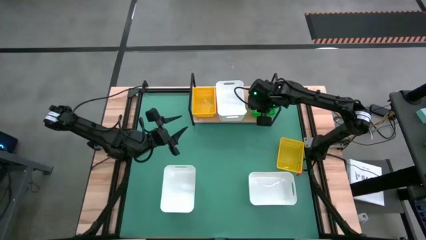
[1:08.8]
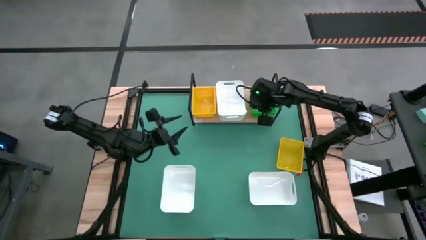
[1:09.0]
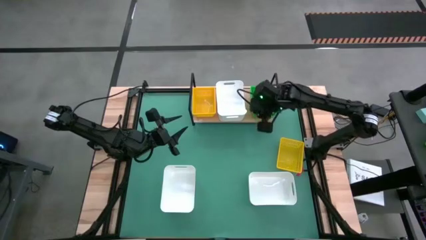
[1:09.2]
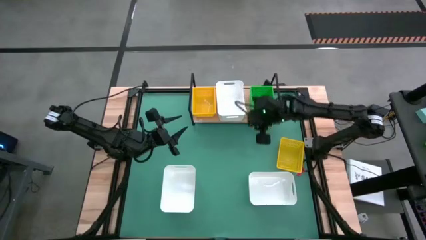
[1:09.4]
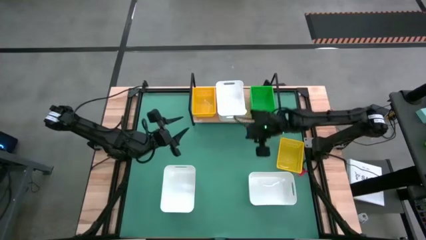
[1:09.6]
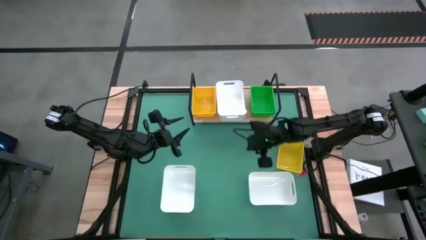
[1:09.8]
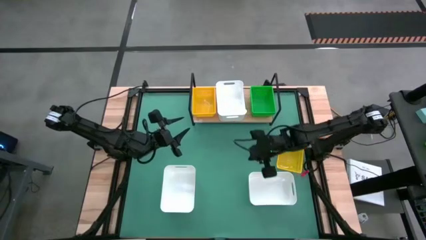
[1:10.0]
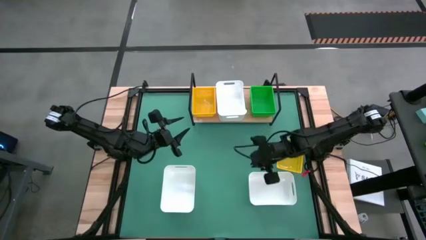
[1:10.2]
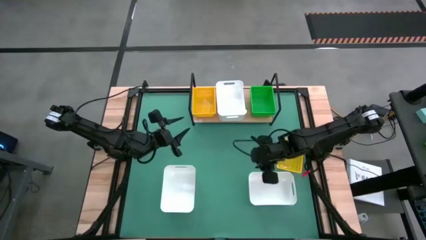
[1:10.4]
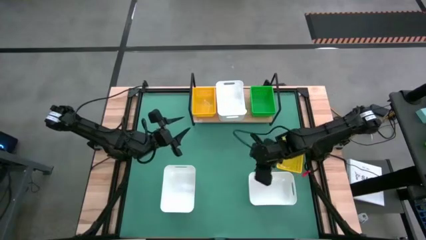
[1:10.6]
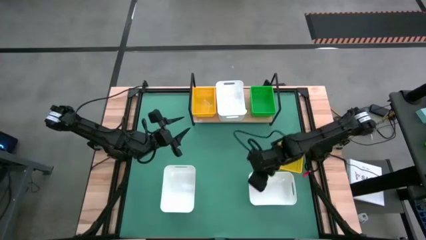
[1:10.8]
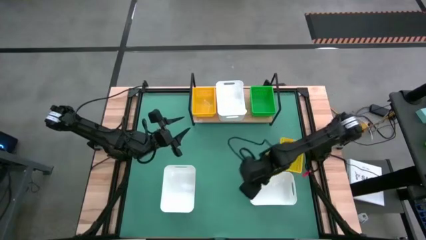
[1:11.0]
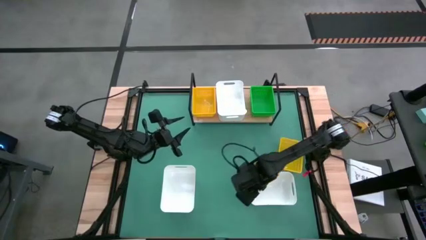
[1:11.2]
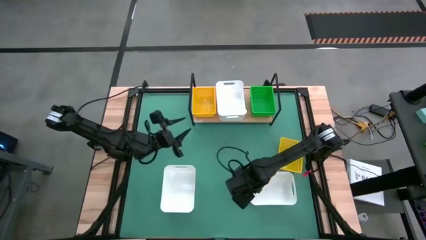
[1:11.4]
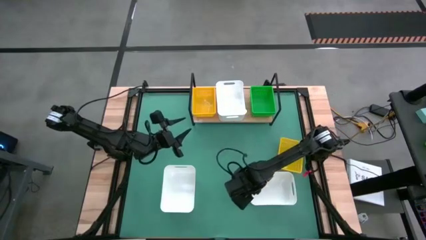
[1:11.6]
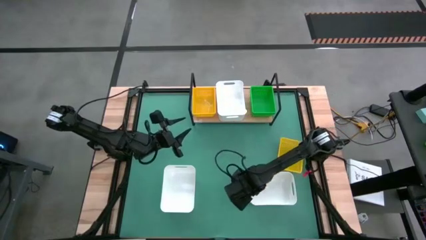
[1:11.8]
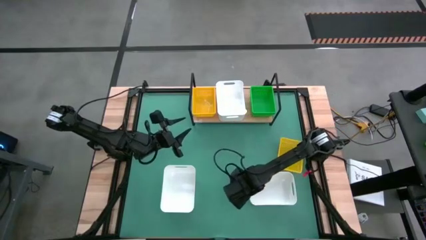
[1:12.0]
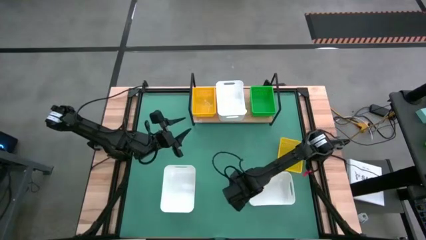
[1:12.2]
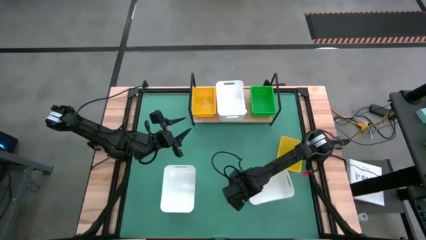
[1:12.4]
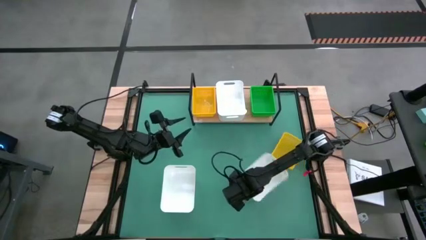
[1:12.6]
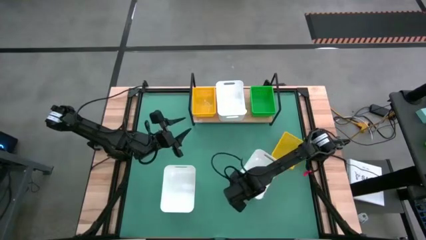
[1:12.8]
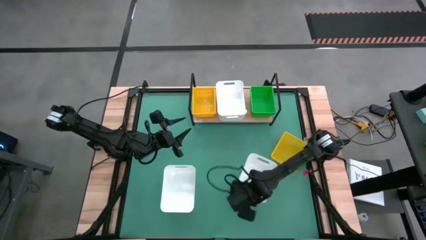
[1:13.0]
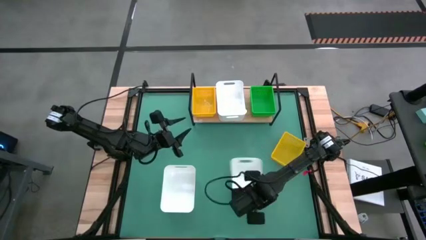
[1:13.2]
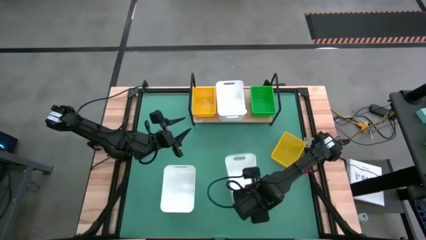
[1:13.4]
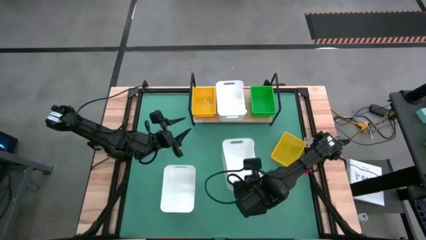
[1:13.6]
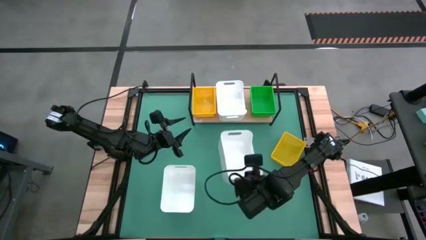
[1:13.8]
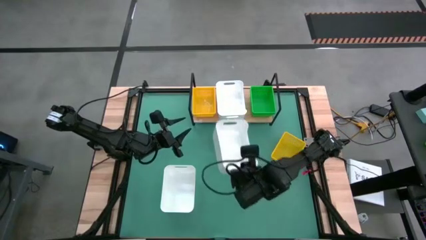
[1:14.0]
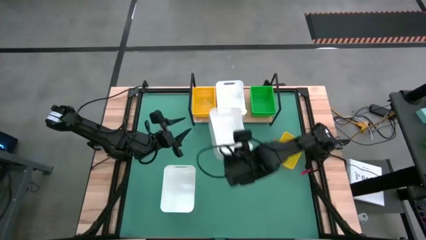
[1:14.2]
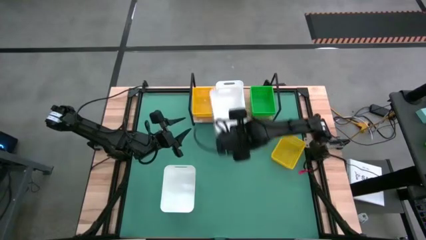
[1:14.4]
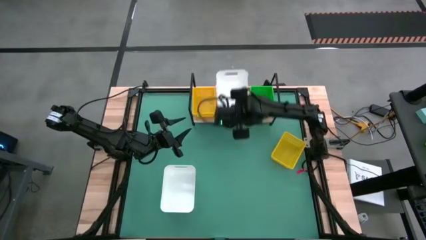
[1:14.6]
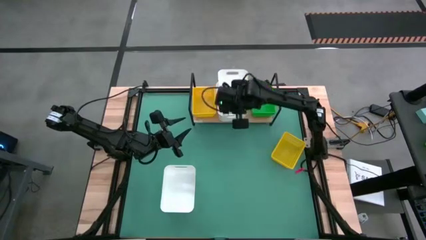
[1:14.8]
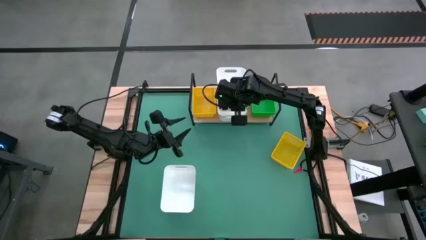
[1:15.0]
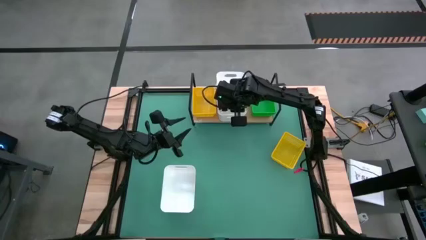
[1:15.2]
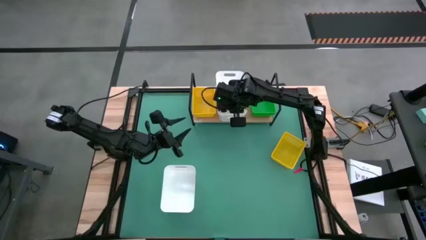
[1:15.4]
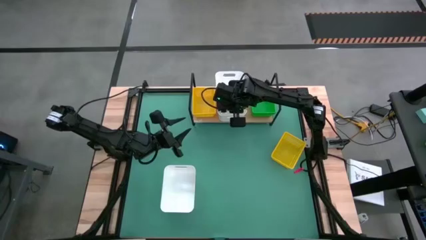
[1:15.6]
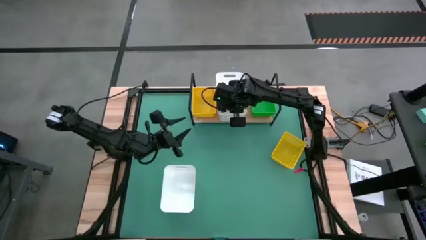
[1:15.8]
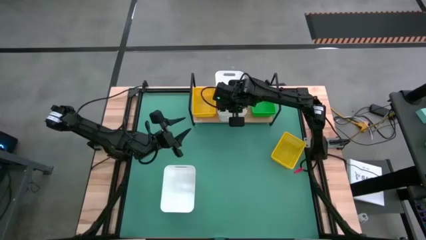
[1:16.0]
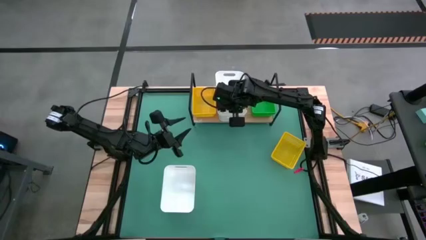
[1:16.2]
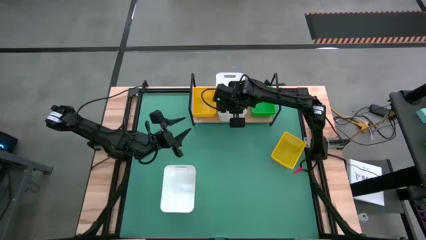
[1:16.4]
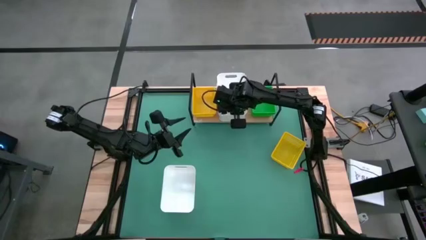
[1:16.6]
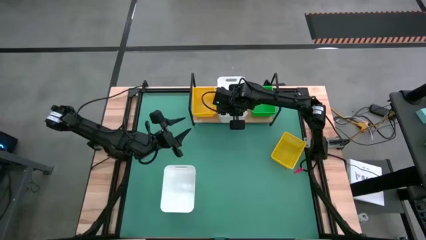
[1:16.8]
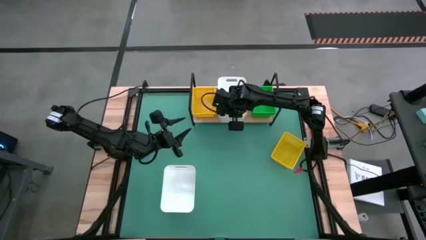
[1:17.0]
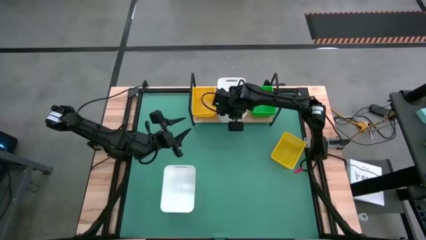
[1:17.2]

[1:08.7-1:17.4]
Task: Stack baskets on shelf by color
Stack the right white bin on top of the white bin on the shelf

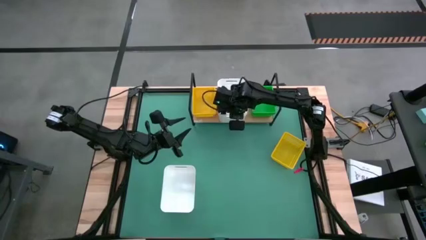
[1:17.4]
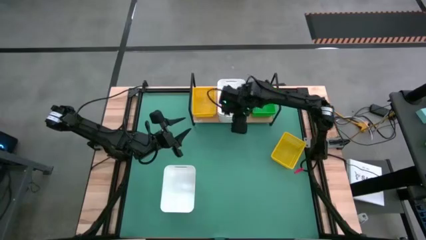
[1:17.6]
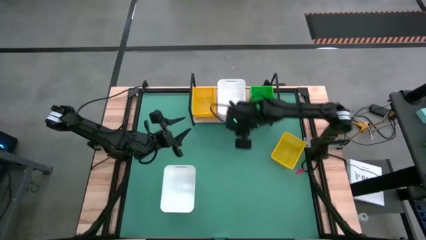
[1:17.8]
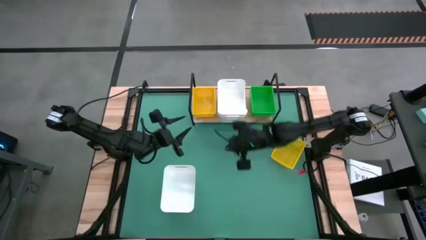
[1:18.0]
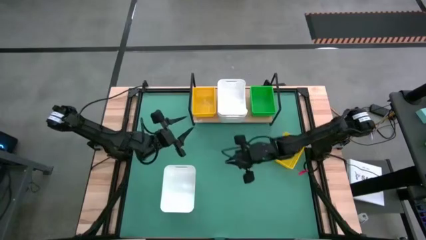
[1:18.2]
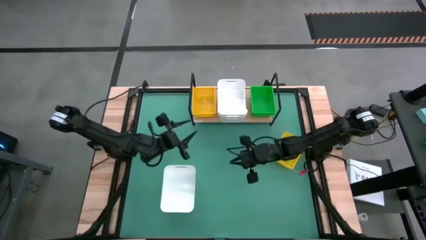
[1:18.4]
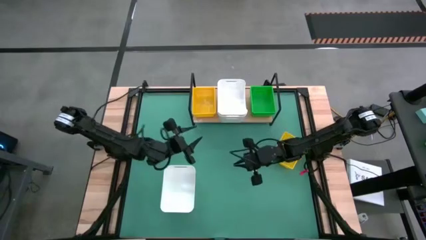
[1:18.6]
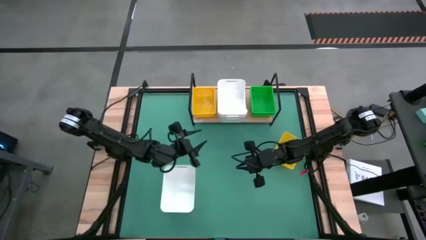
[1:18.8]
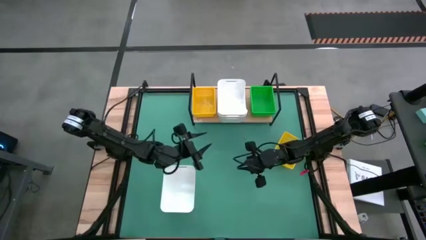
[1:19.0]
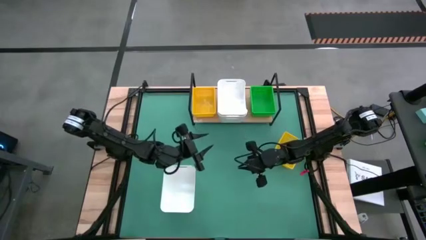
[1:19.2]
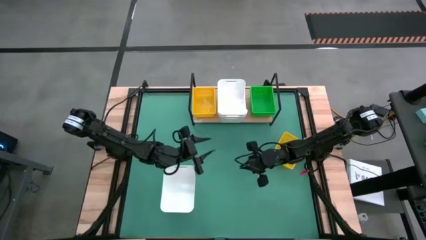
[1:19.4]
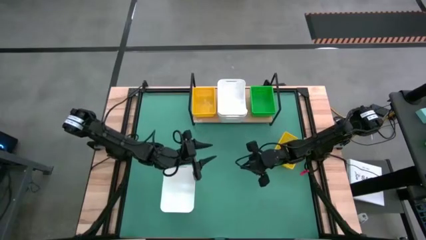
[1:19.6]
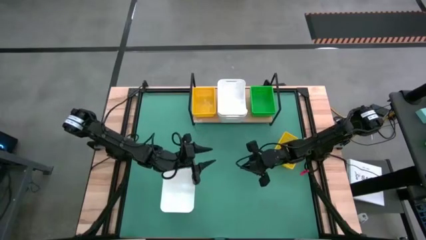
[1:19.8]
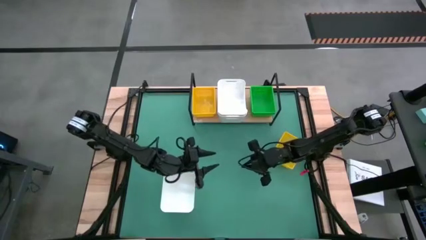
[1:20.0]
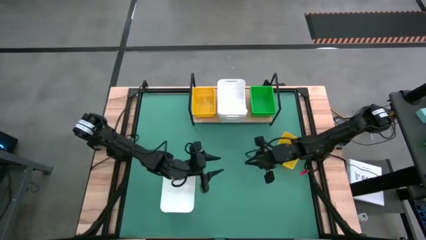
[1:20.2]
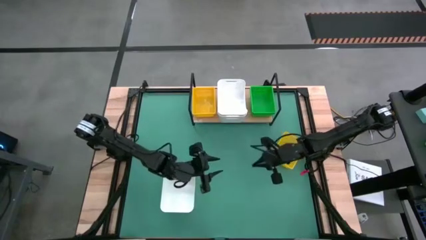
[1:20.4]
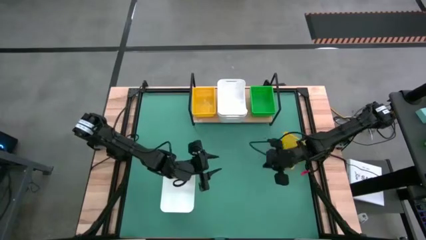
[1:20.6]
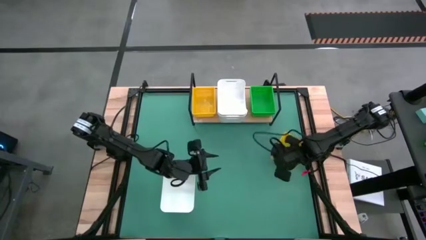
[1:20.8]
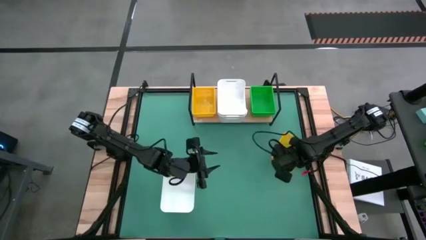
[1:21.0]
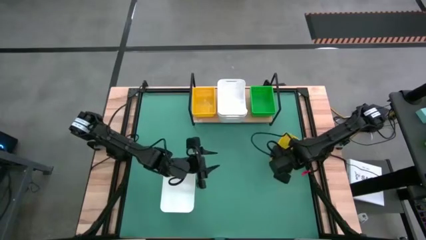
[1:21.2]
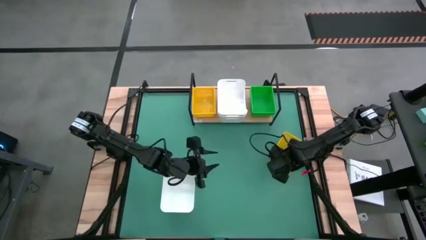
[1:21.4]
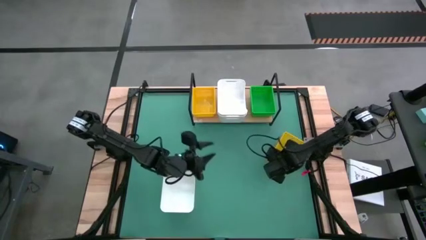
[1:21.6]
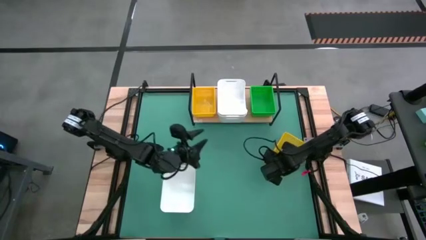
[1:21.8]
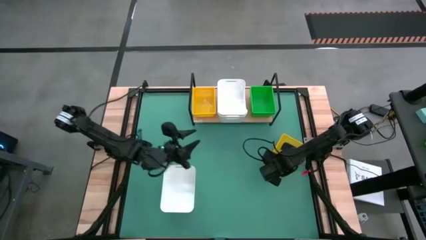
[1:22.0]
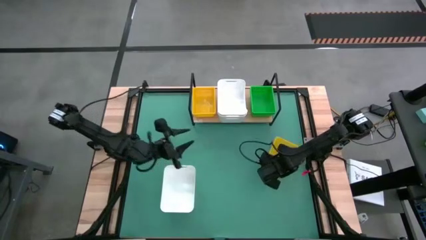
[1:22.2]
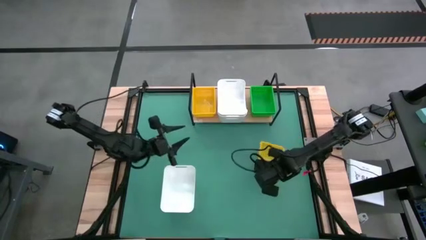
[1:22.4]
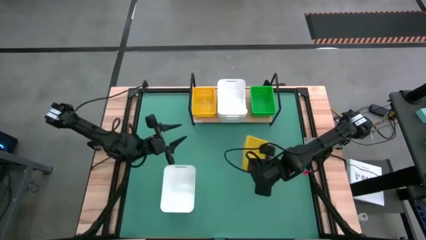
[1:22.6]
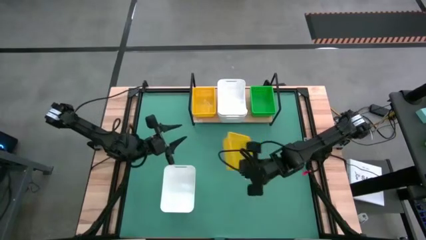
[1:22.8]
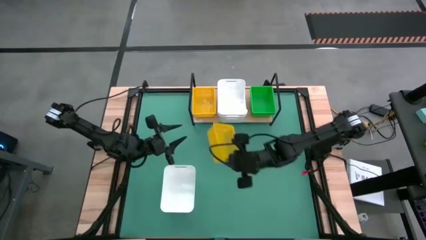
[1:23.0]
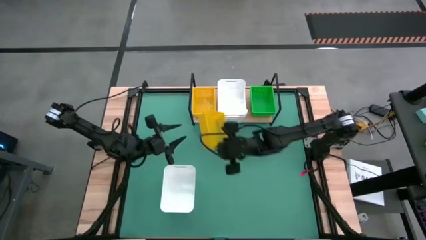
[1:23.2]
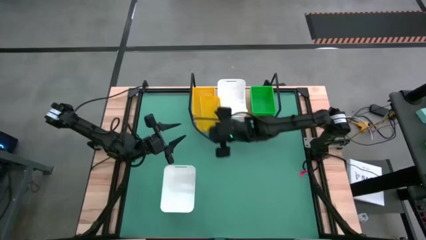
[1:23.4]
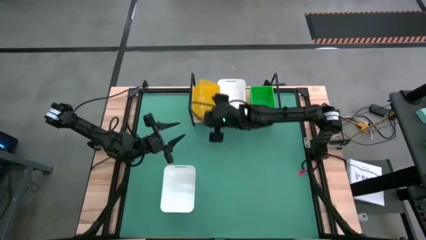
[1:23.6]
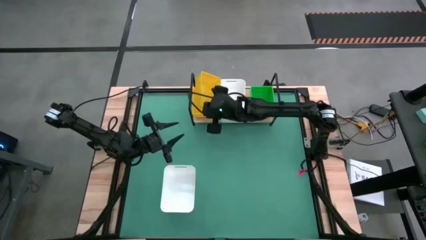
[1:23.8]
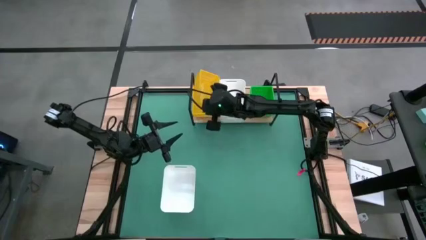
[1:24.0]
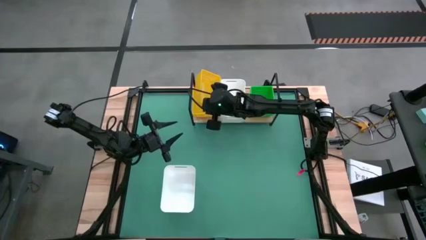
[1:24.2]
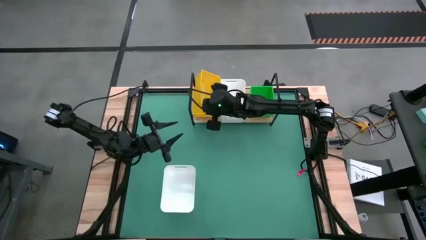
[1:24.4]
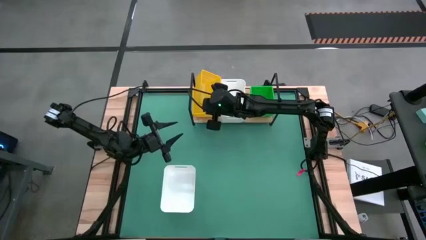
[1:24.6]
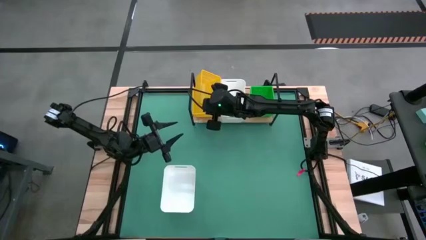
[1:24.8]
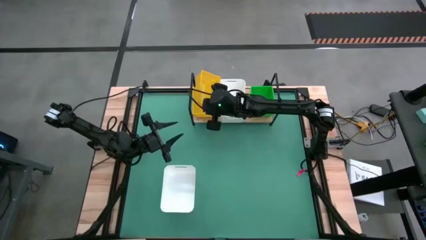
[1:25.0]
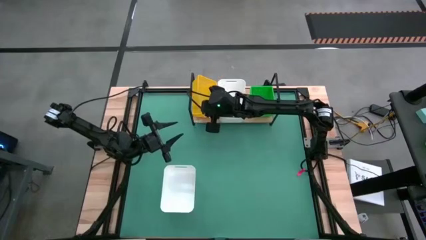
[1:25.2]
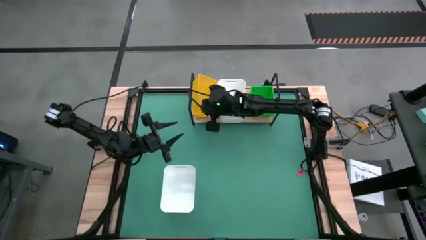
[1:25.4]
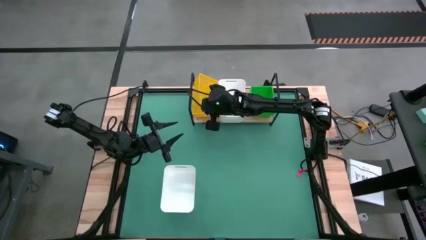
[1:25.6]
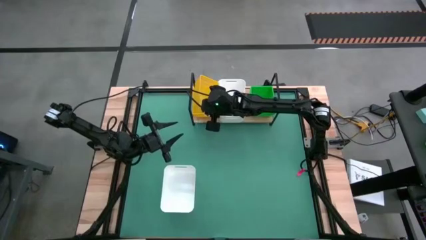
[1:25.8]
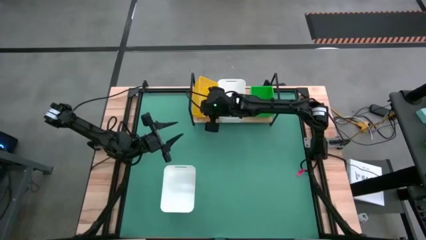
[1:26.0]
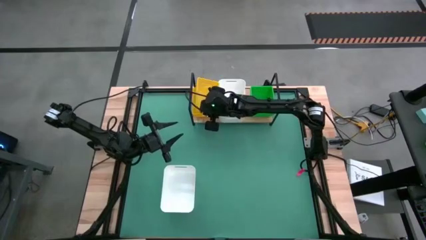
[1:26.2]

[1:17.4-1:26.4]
Stack the yellow bin on top of the yellow bin on the shelf
